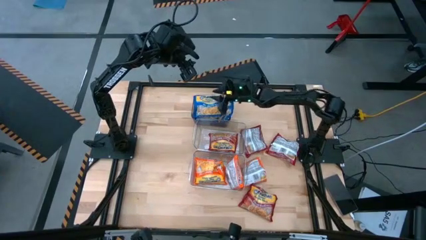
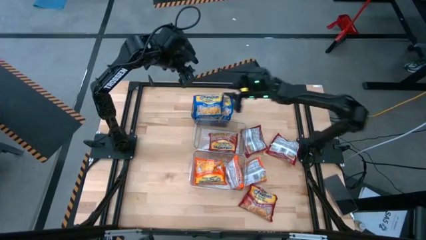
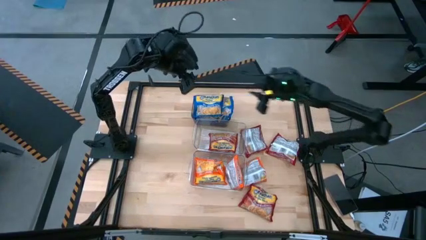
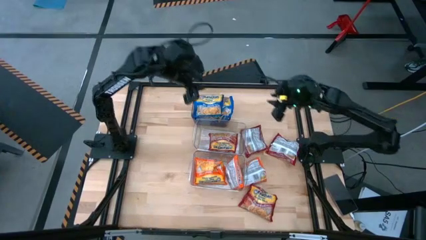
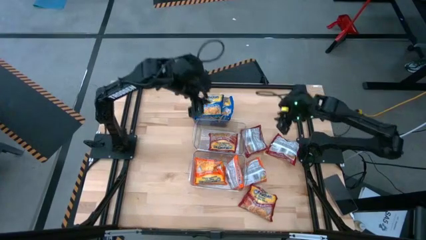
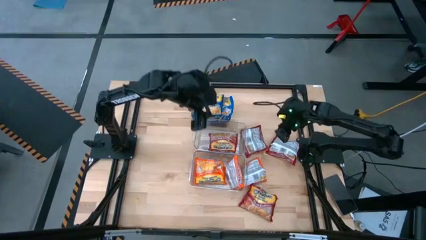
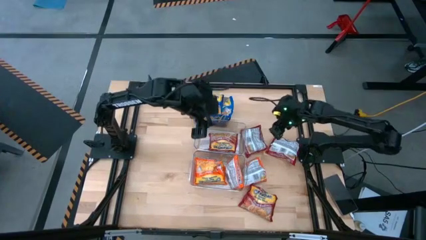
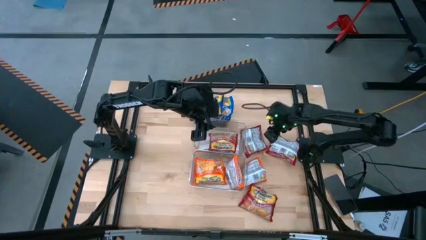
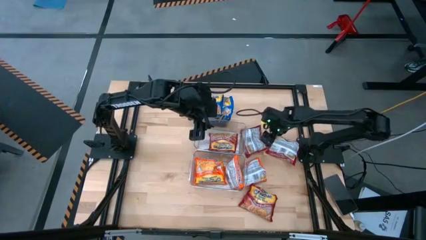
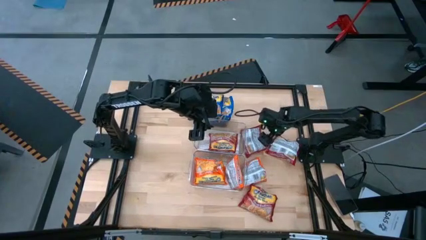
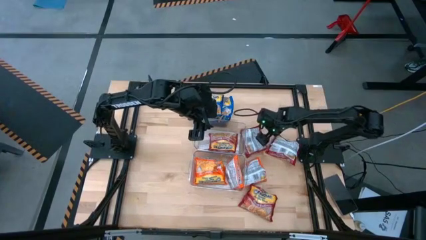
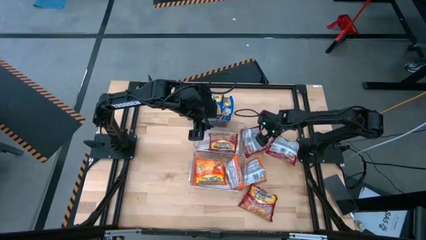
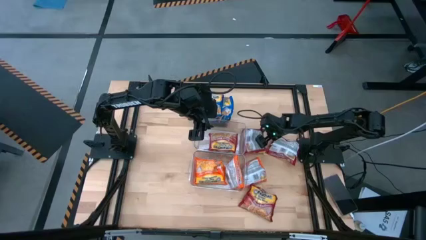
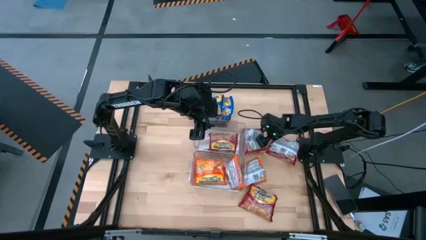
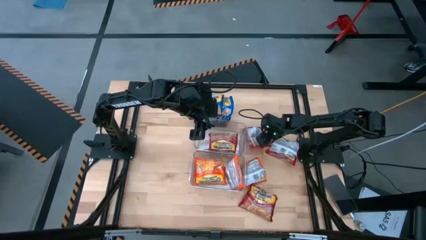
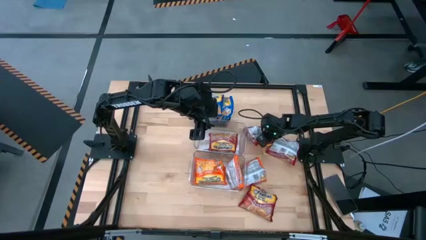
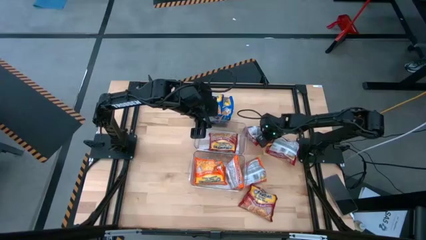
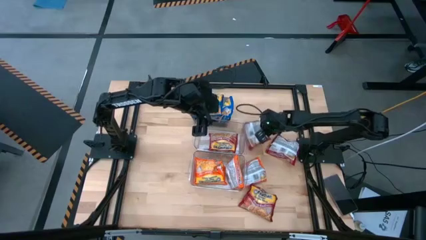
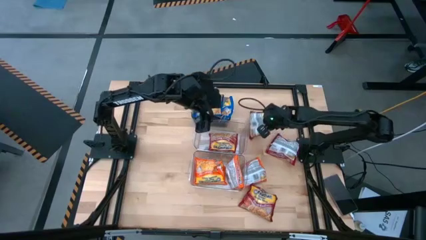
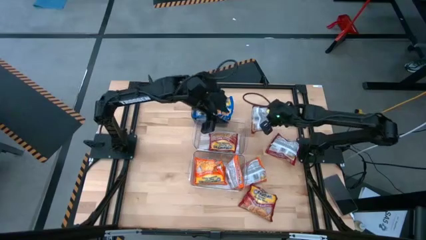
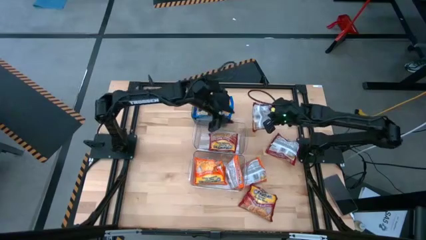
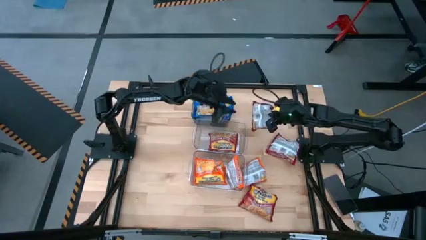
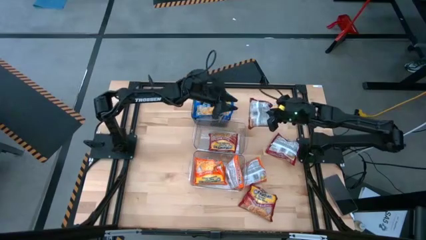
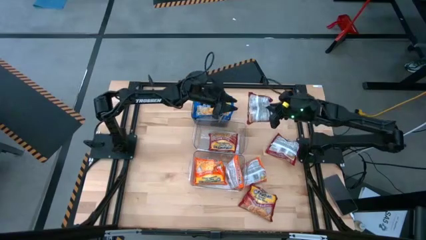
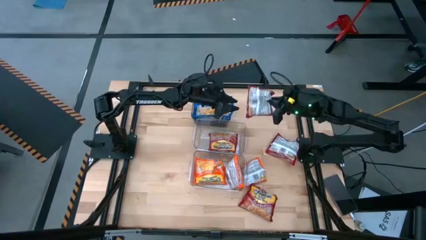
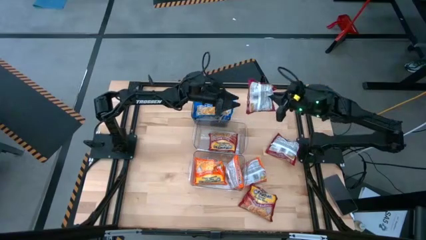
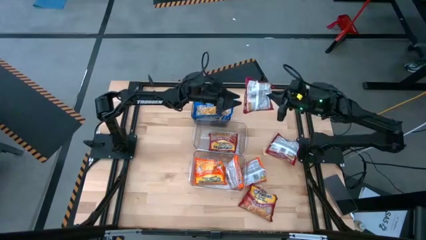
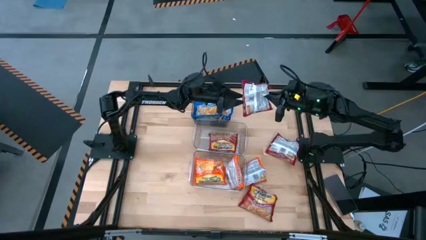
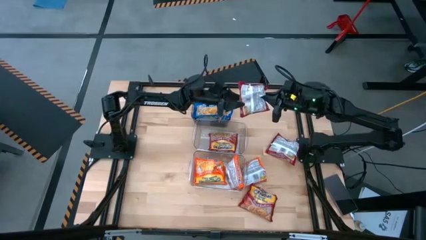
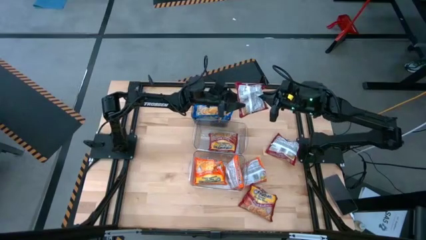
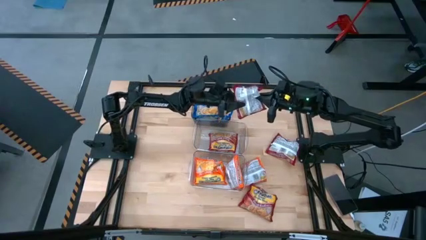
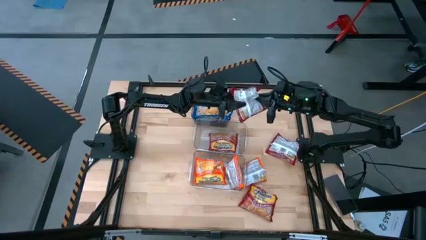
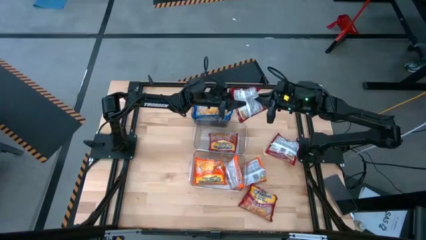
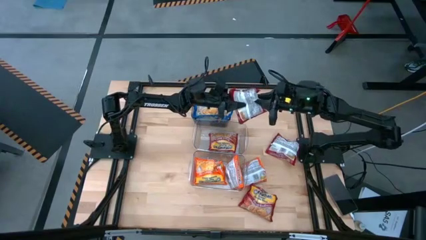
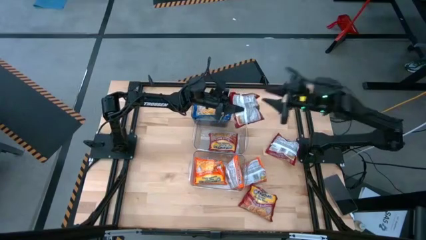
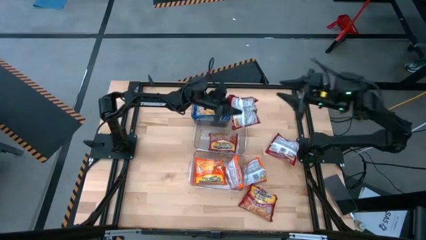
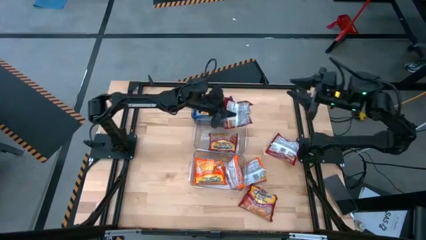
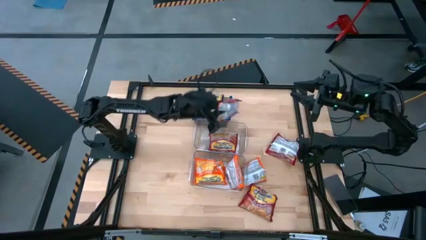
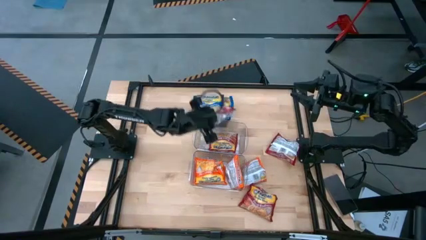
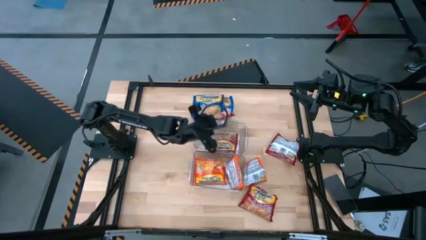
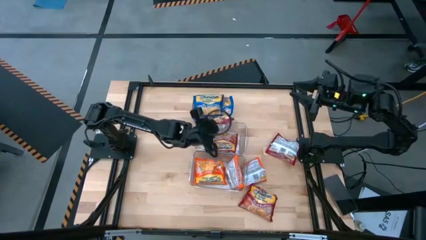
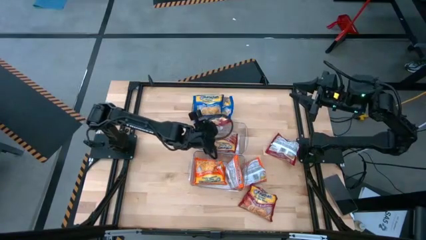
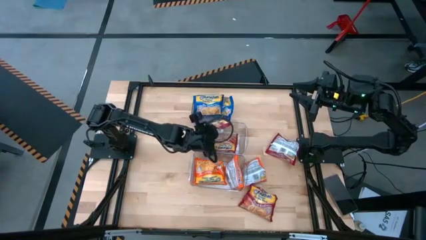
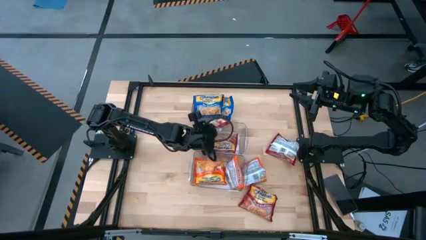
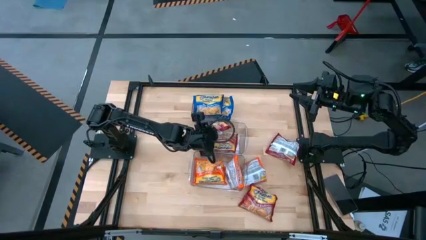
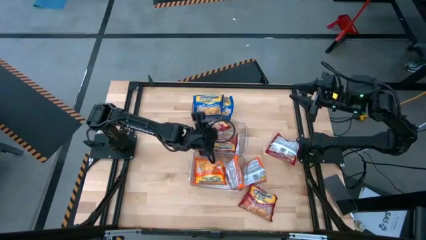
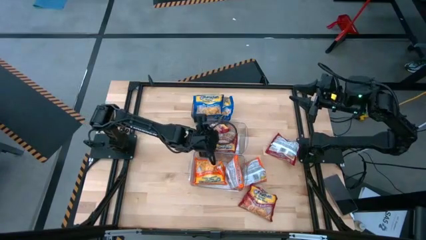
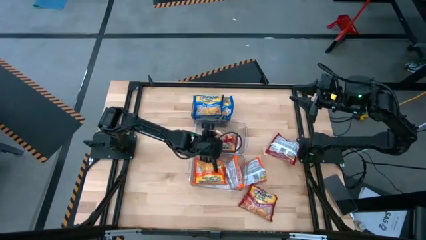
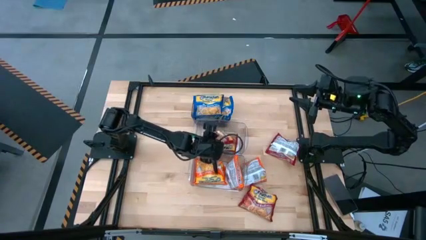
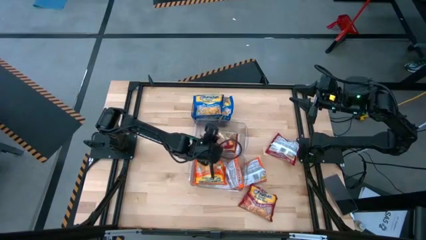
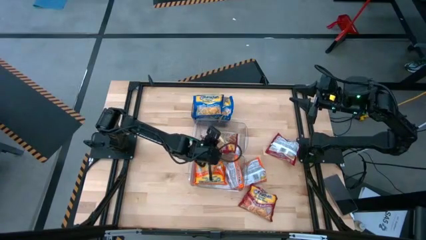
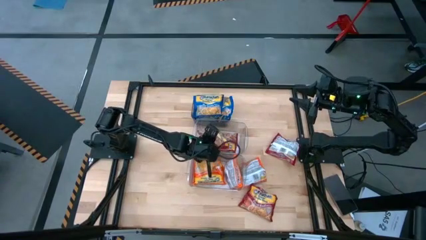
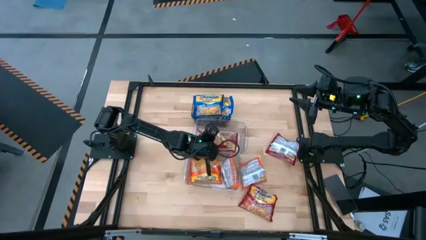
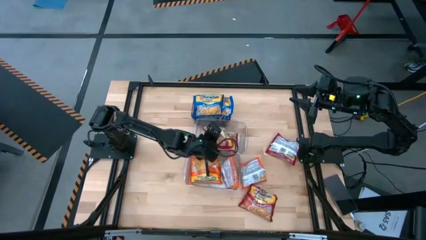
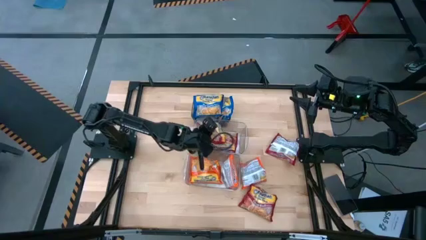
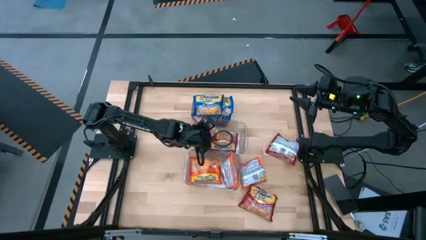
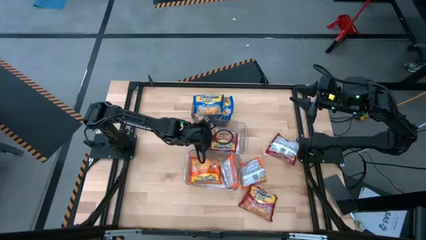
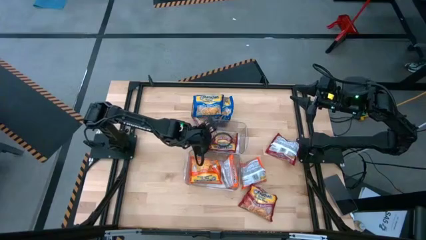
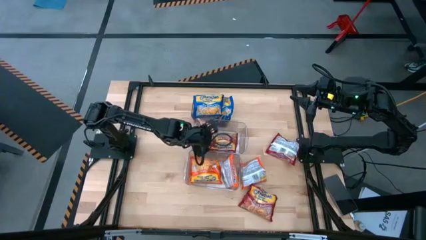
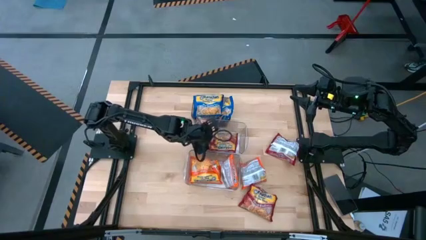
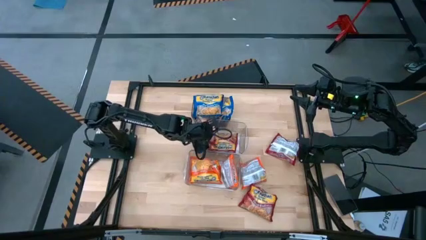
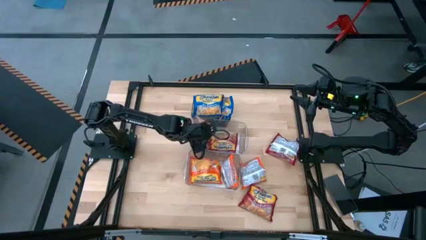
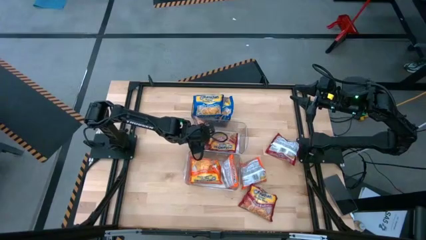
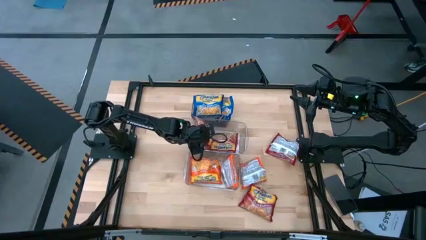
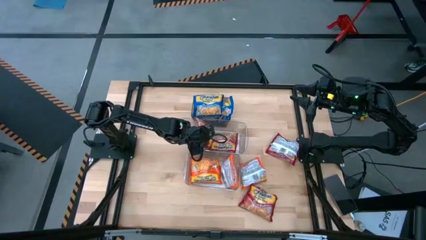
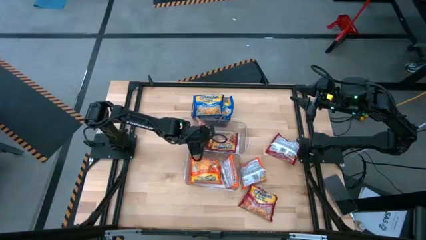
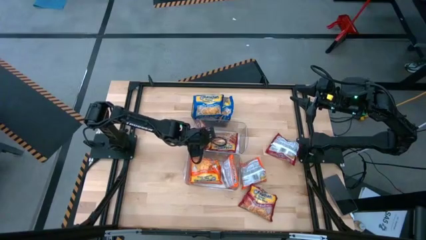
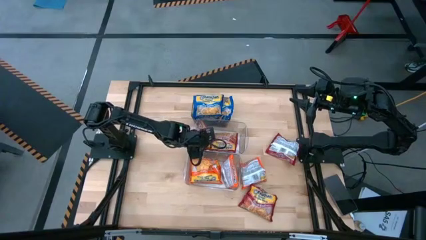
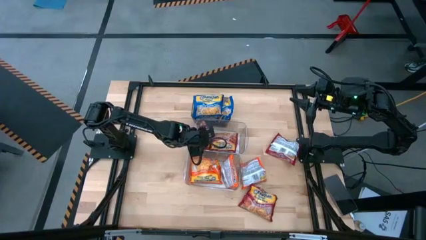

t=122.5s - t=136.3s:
Task: Sort Maruchan noodles
Put the top left red noodle pack into the top transparent bin
